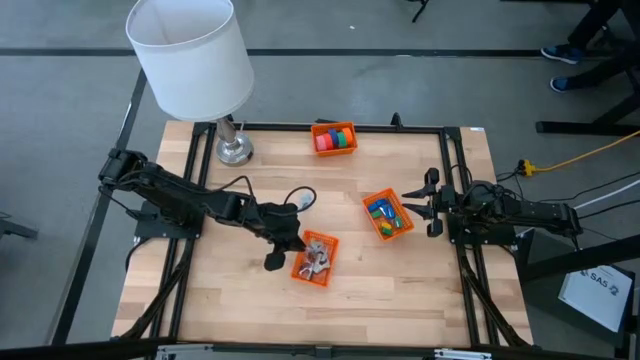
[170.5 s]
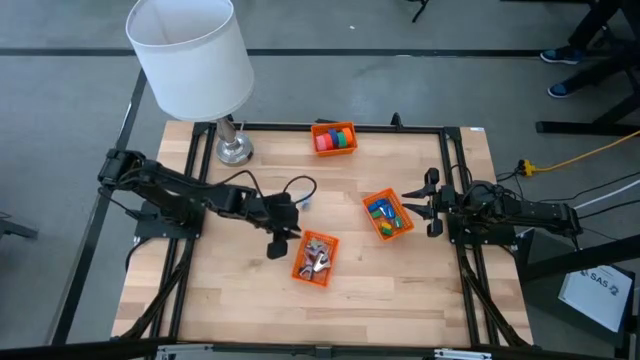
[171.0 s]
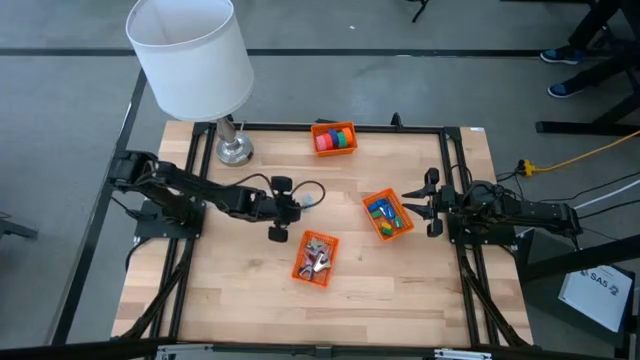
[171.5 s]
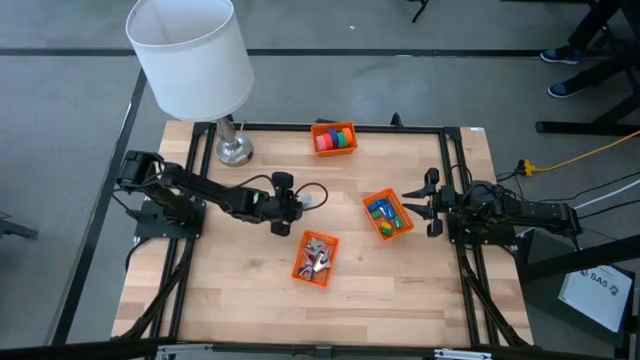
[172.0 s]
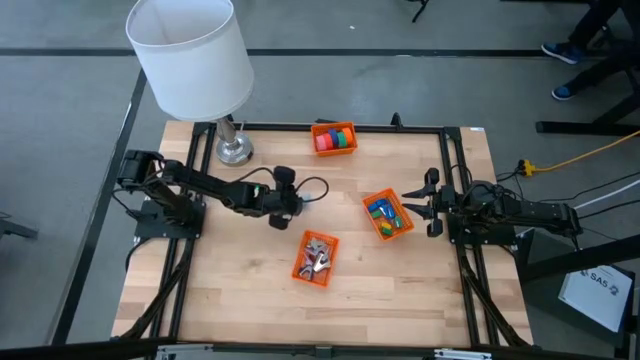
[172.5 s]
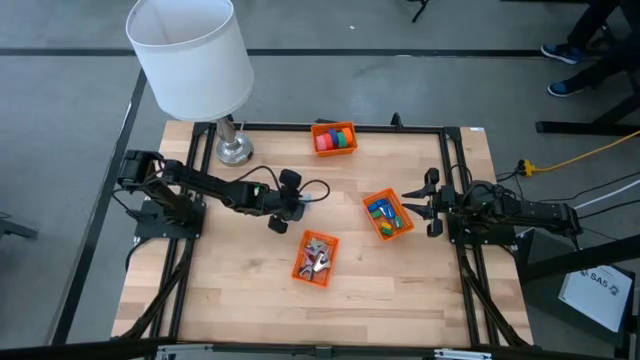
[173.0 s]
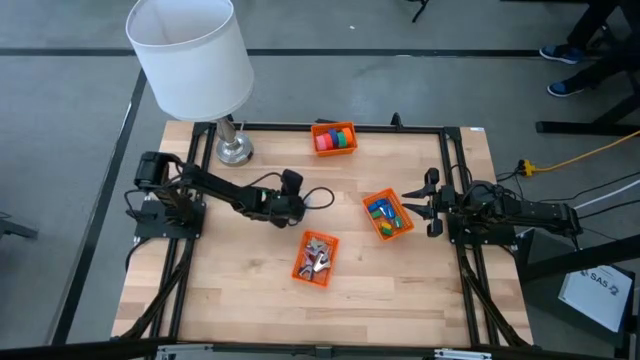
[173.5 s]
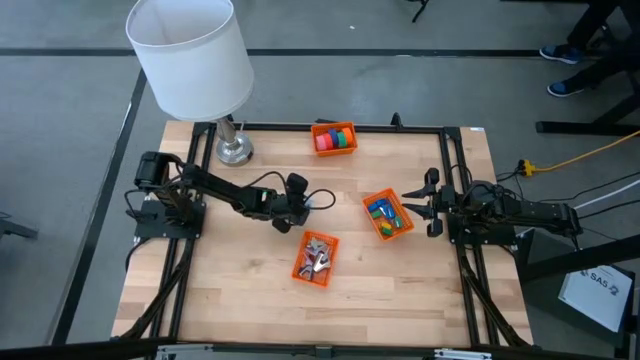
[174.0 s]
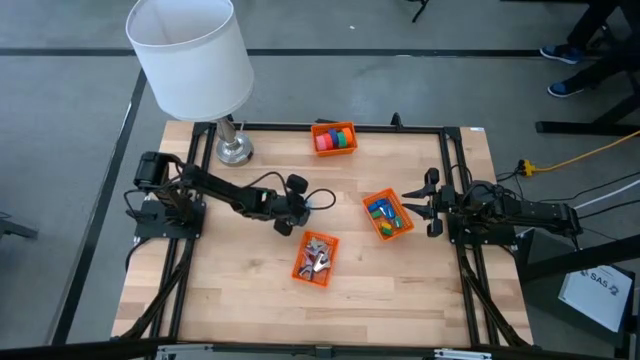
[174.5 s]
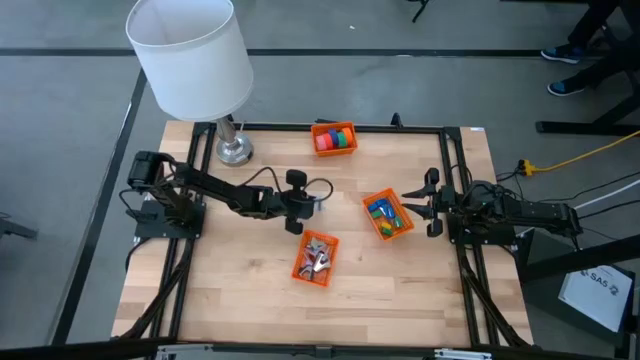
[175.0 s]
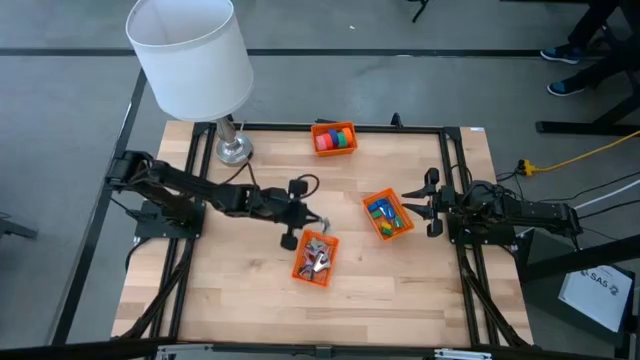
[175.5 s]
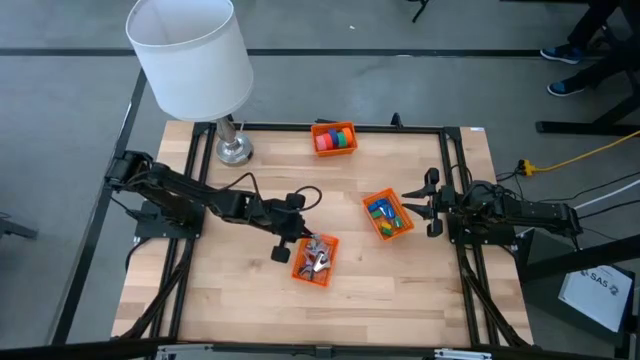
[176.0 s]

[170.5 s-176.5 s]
Task: Pick and place Stapler, Stapler remover, tape
Put the blue staple remover into the bottom orange bin

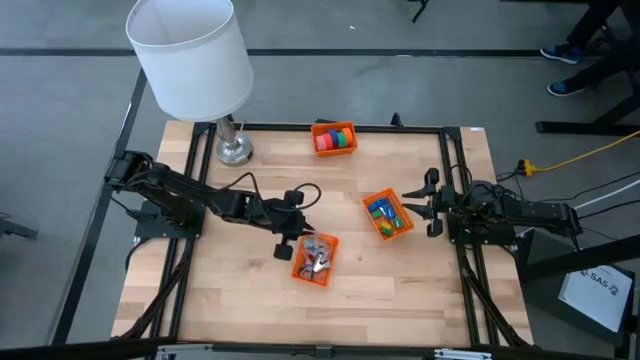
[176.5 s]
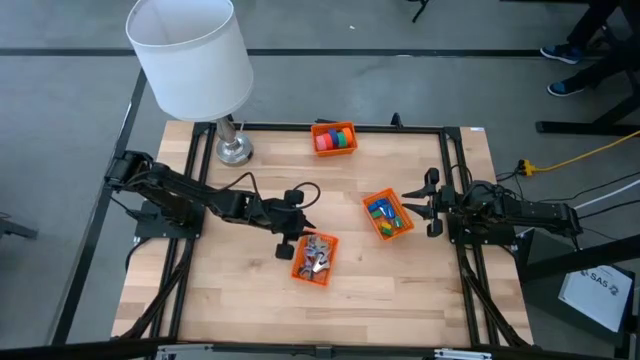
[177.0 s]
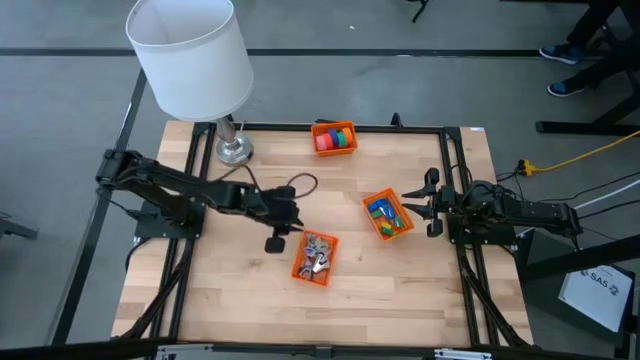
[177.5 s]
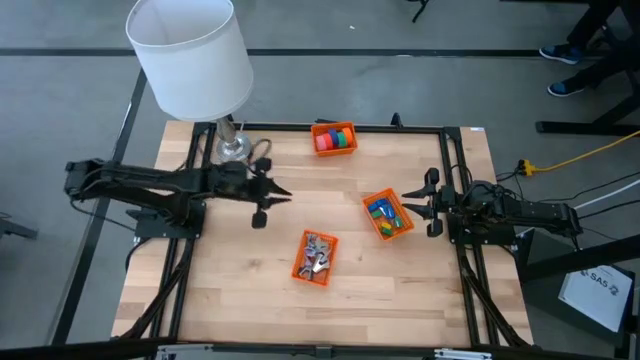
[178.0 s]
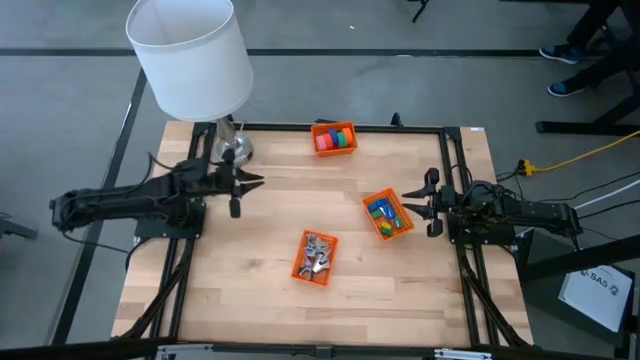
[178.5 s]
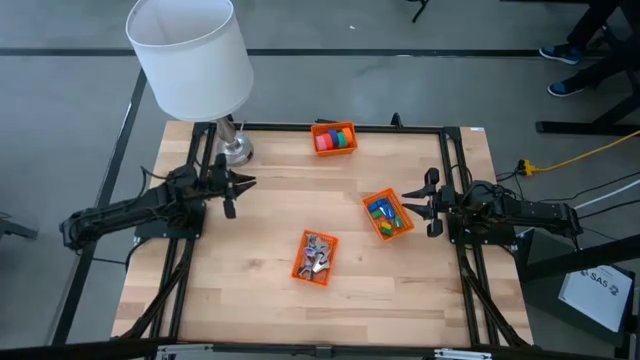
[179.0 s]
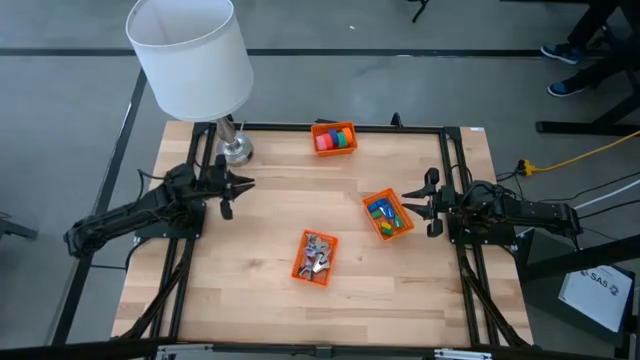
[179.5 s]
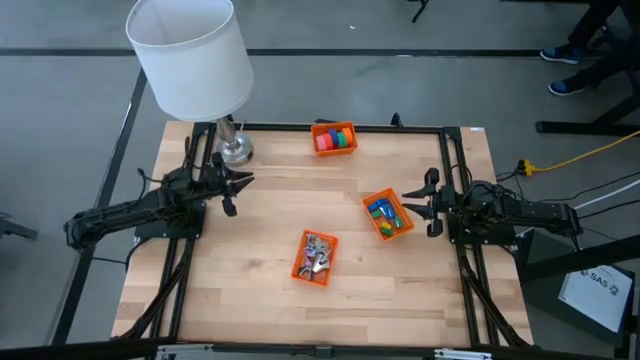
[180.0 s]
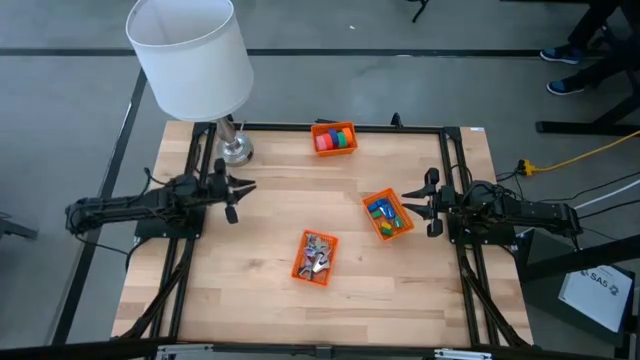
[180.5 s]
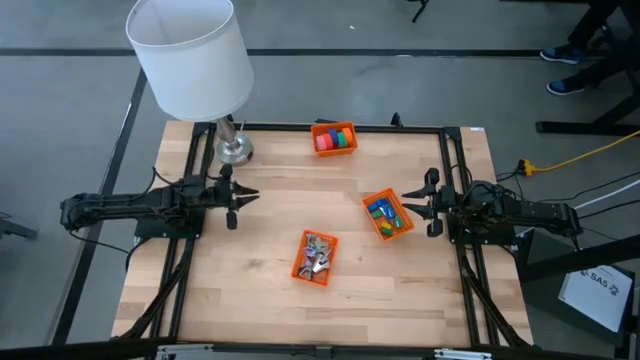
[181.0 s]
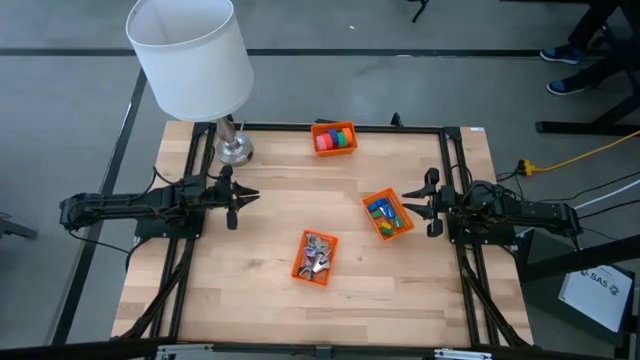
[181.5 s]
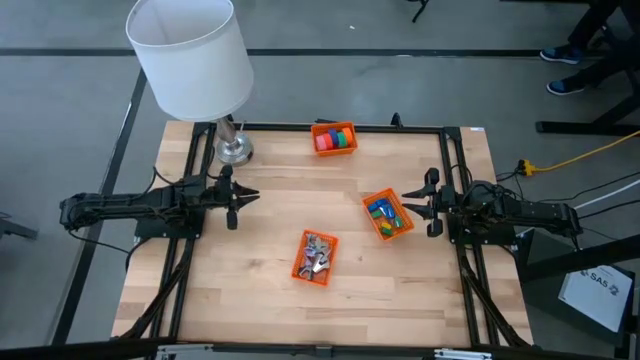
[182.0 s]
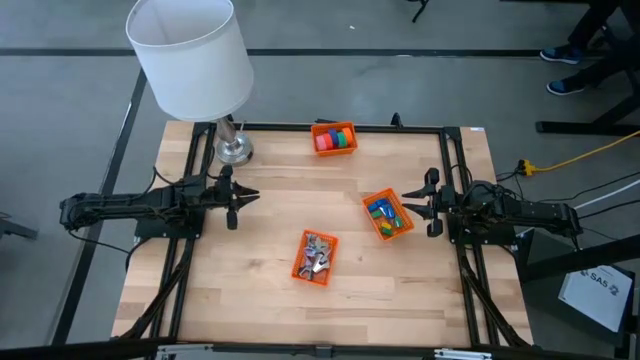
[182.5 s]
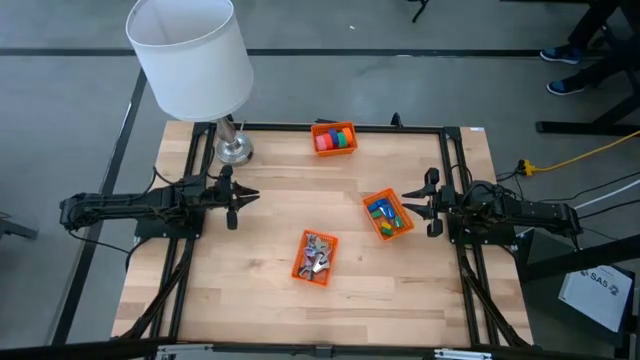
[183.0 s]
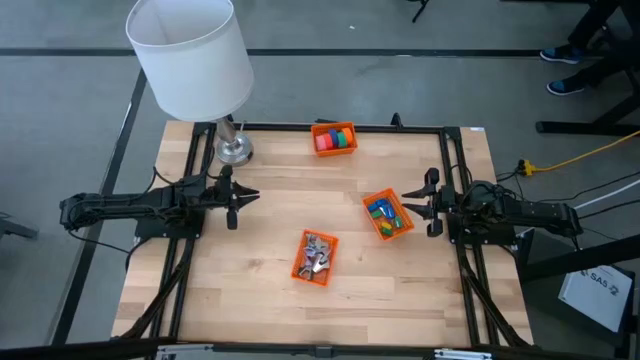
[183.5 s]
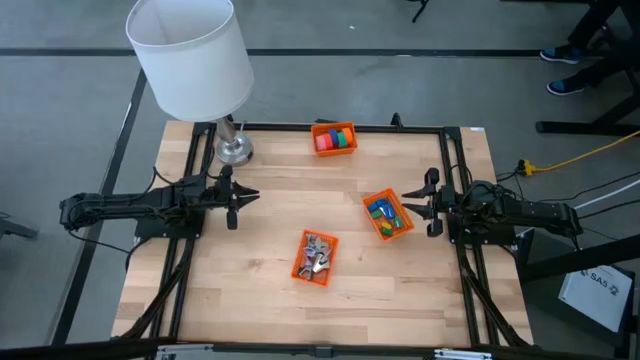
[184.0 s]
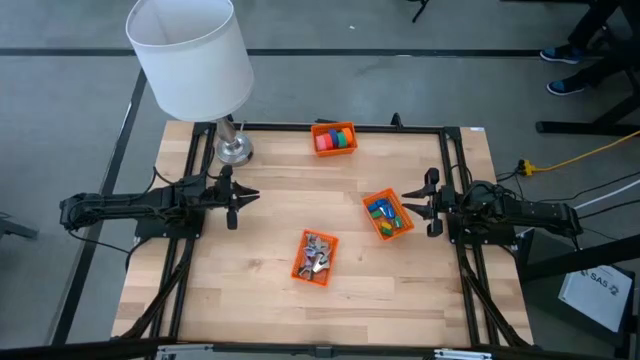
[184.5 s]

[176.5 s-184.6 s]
Return to Home Position

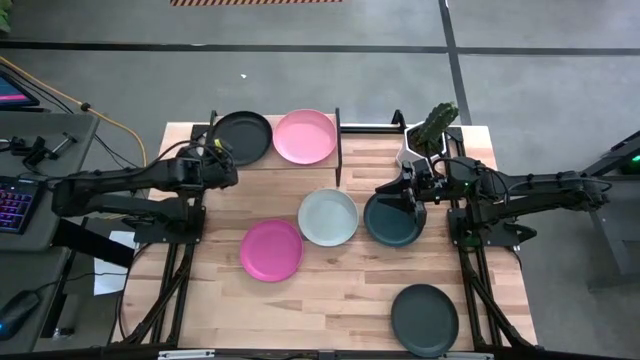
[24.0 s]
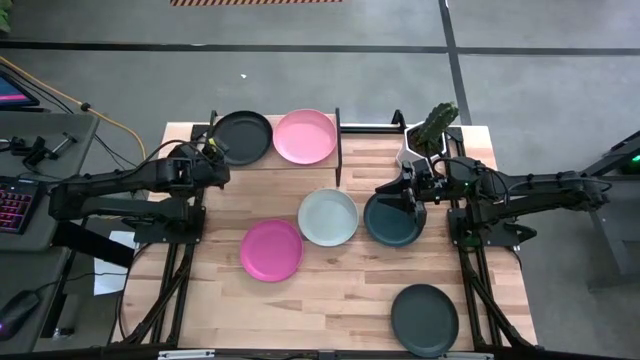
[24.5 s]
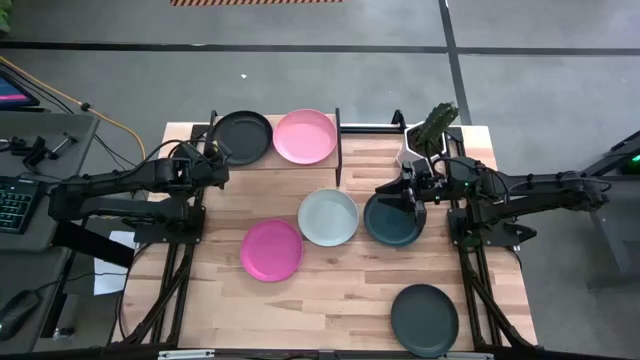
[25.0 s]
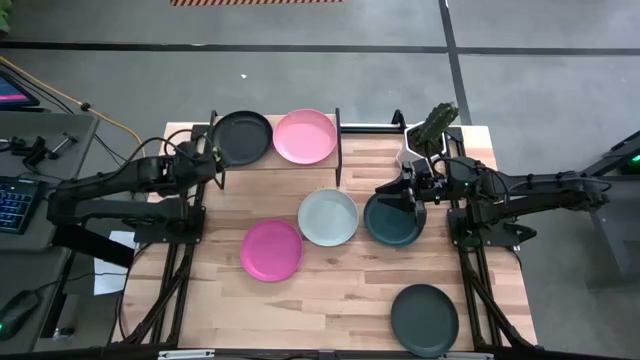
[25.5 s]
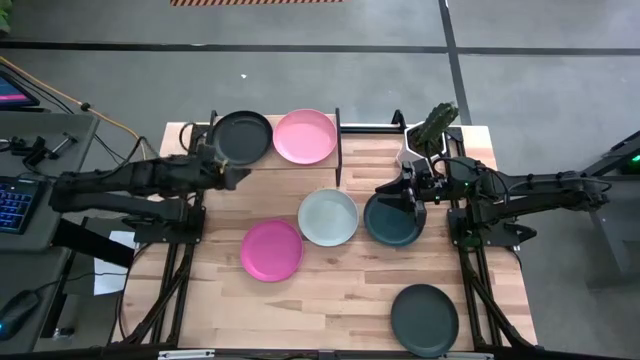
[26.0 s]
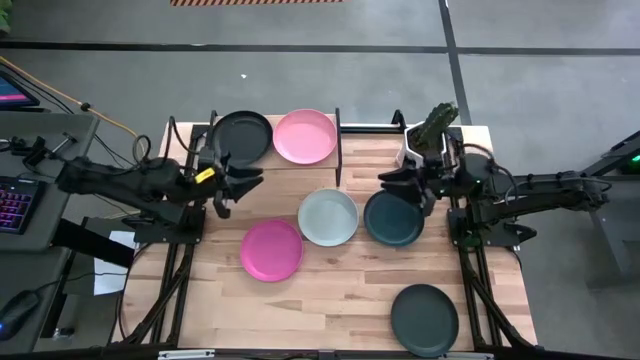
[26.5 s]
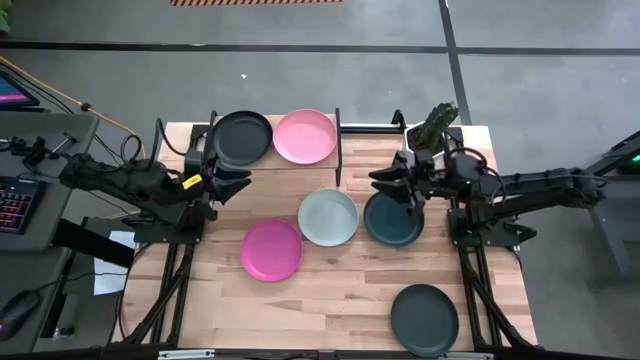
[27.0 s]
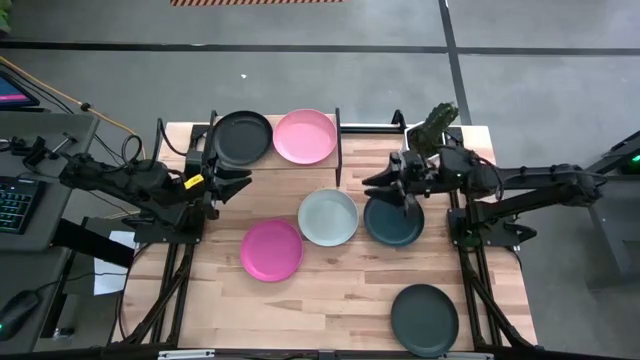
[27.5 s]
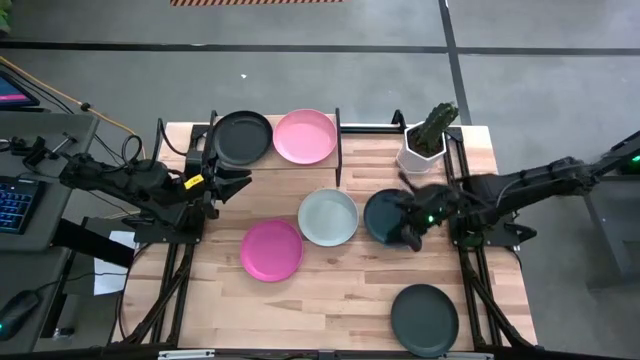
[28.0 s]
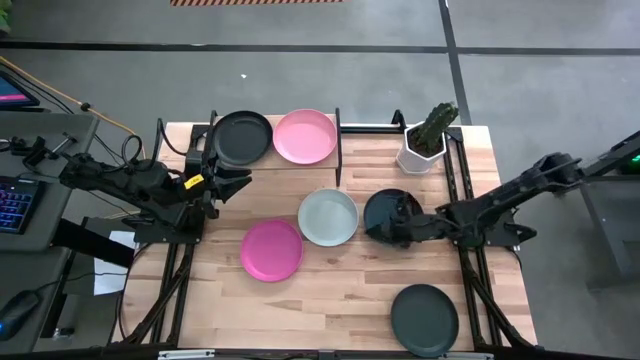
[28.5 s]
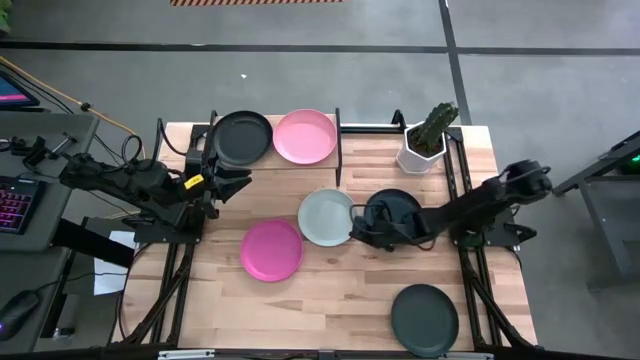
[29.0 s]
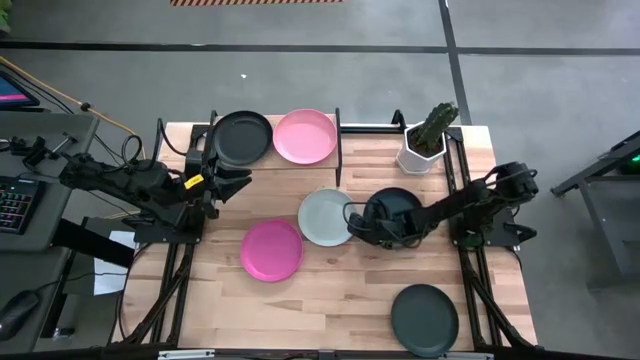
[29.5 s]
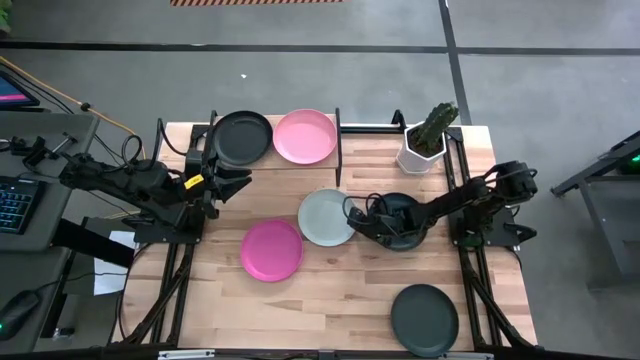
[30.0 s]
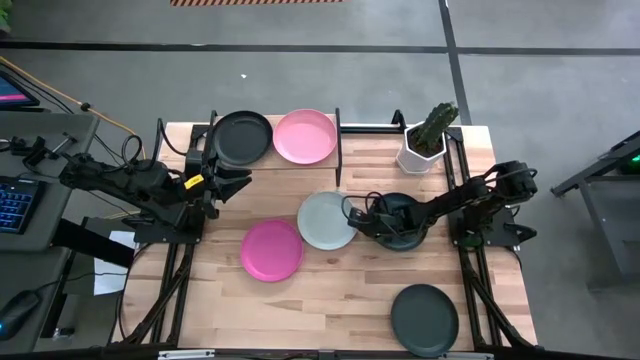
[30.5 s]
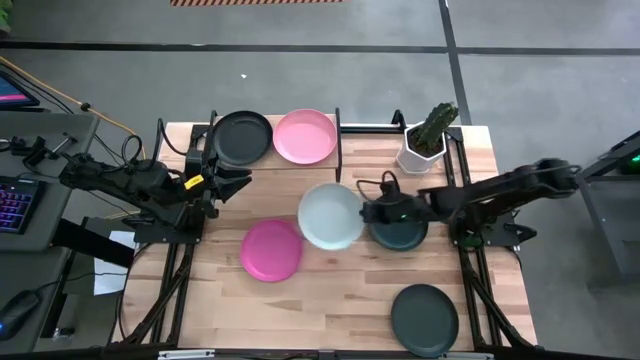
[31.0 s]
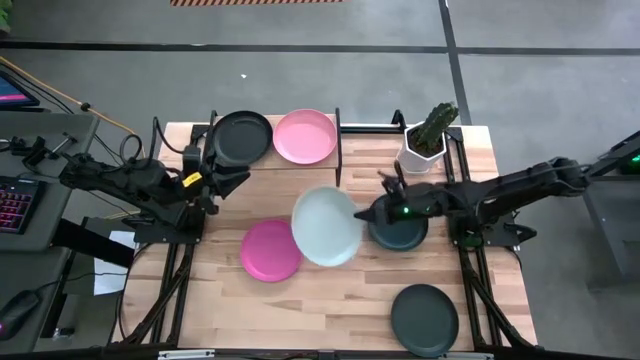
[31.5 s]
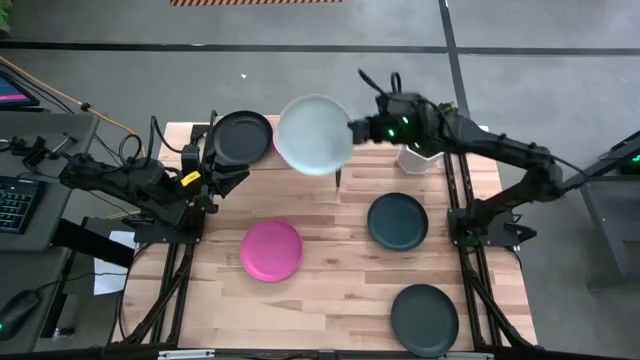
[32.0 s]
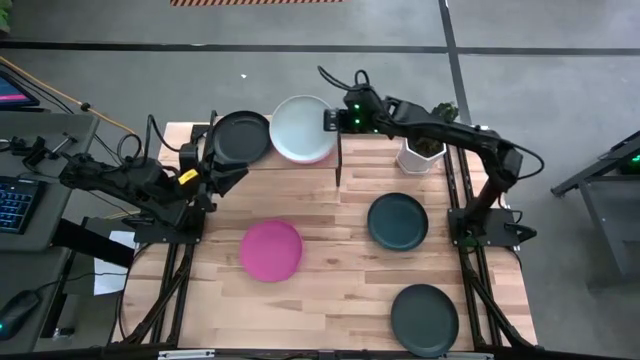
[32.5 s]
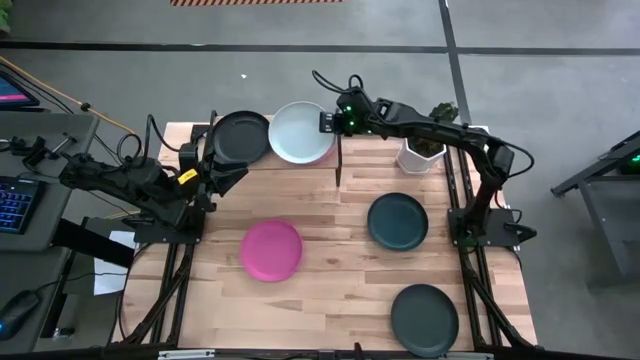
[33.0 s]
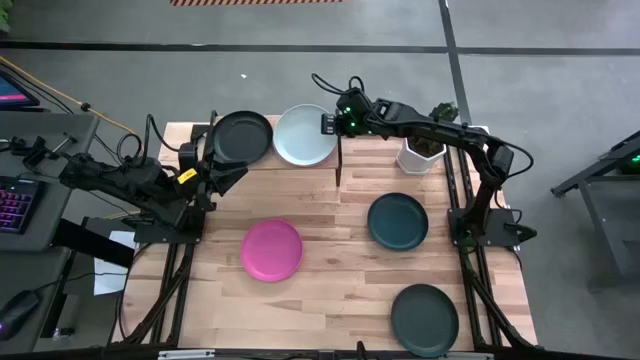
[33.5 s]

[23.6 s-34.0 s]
Task: Place and stack plates onto a shelf
Stack the white plate on the top of the light pink plate on the shelf
